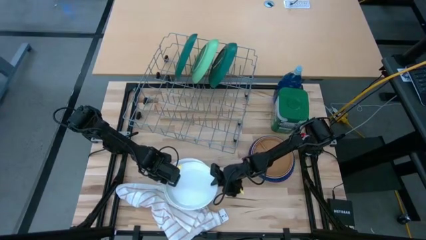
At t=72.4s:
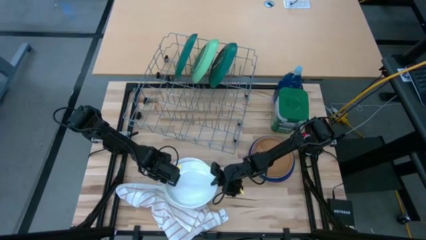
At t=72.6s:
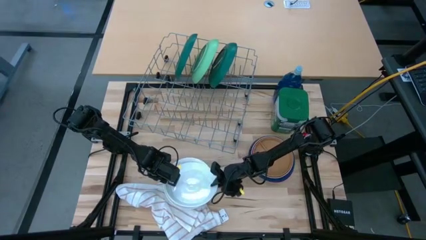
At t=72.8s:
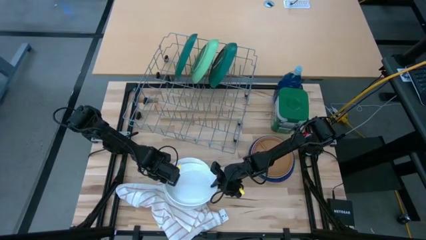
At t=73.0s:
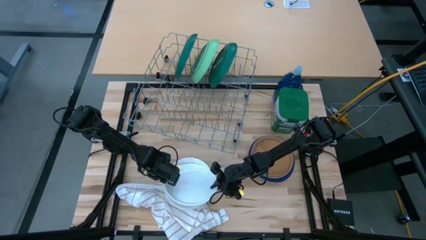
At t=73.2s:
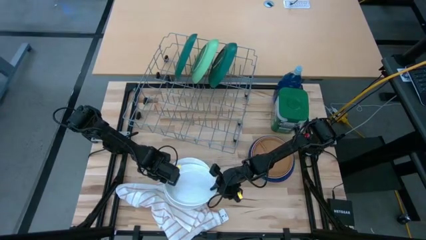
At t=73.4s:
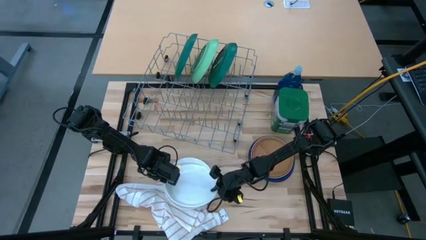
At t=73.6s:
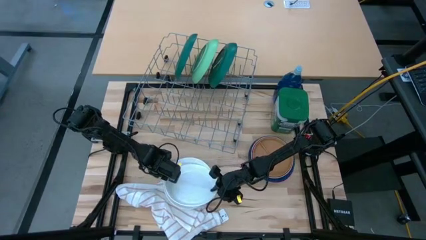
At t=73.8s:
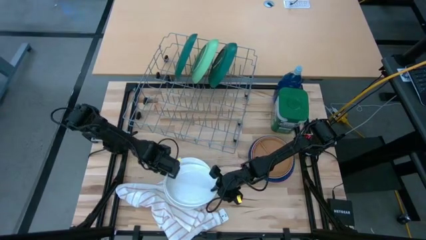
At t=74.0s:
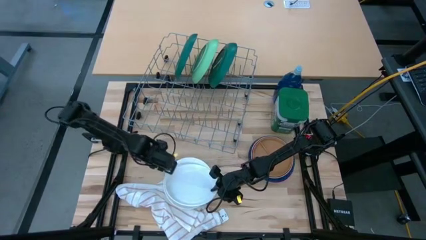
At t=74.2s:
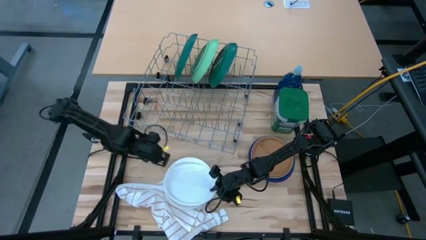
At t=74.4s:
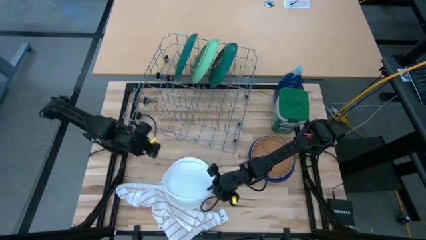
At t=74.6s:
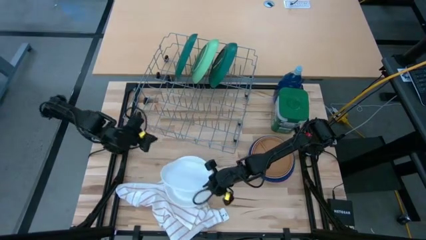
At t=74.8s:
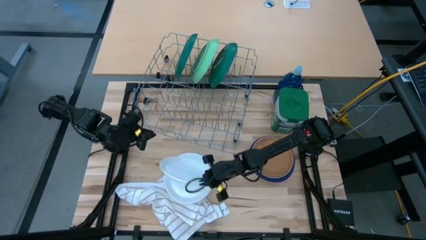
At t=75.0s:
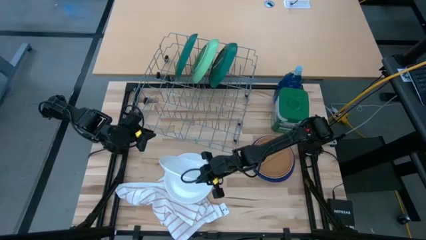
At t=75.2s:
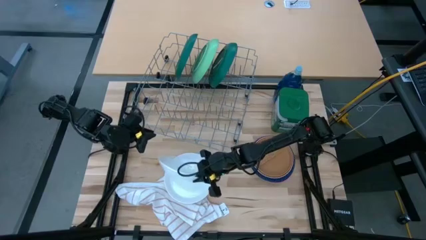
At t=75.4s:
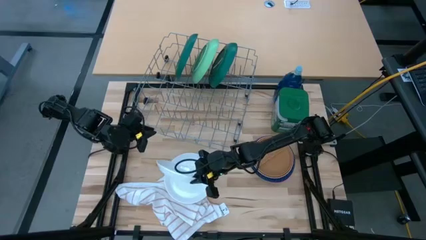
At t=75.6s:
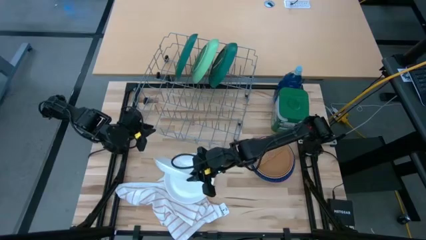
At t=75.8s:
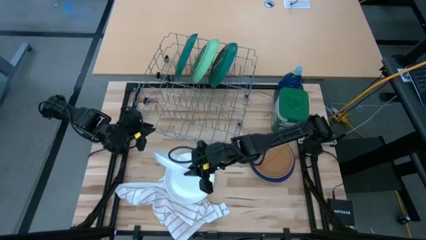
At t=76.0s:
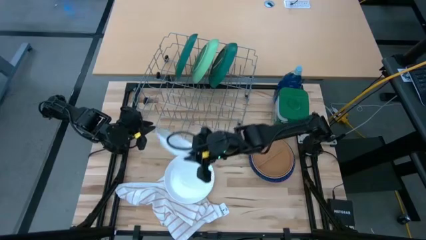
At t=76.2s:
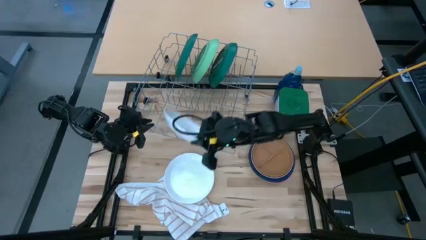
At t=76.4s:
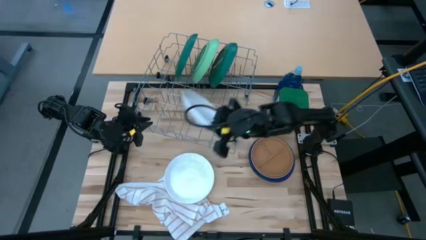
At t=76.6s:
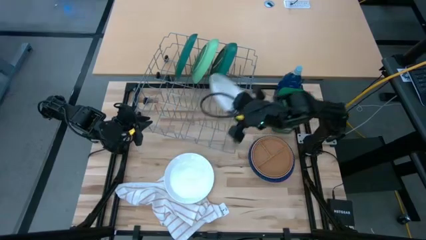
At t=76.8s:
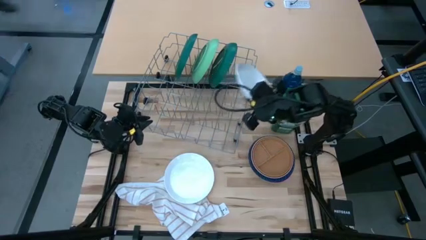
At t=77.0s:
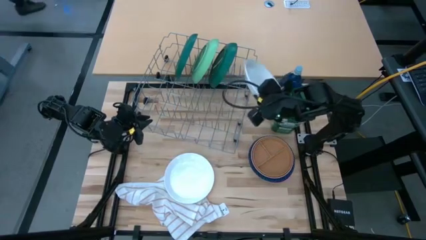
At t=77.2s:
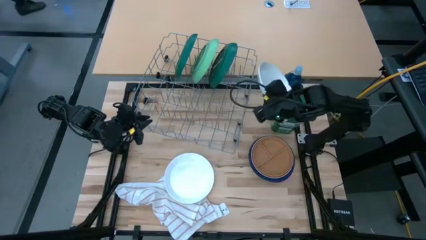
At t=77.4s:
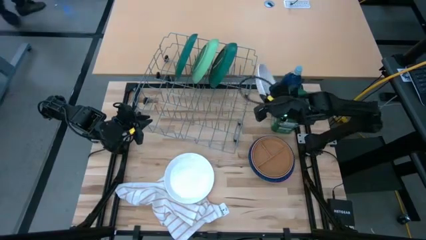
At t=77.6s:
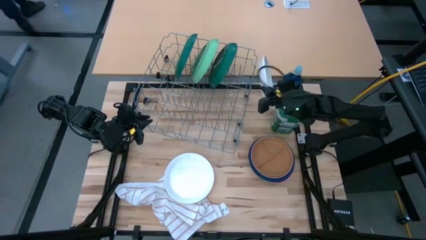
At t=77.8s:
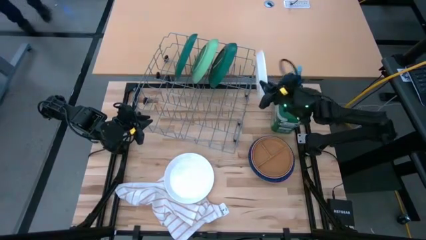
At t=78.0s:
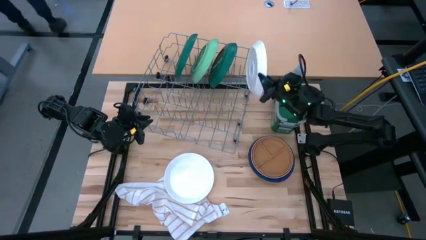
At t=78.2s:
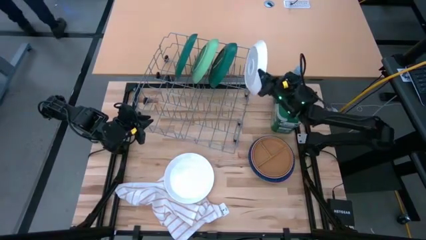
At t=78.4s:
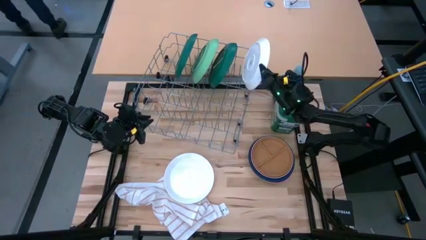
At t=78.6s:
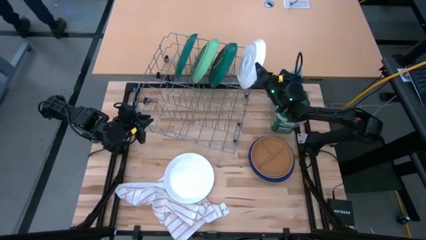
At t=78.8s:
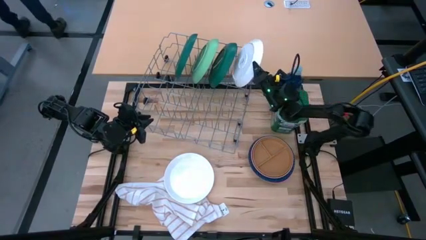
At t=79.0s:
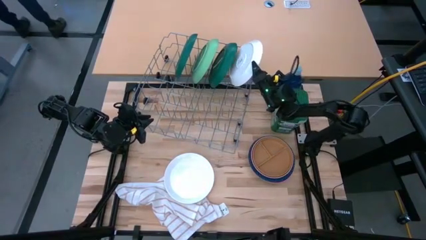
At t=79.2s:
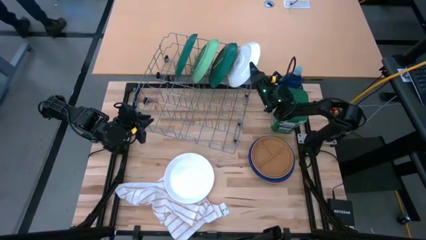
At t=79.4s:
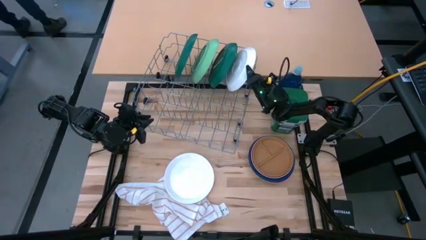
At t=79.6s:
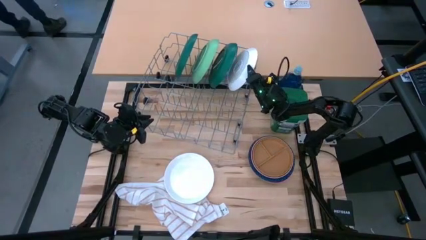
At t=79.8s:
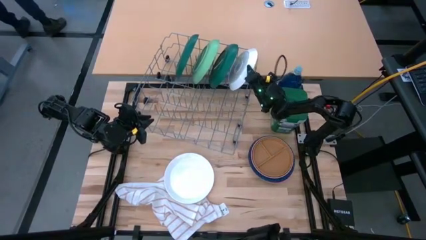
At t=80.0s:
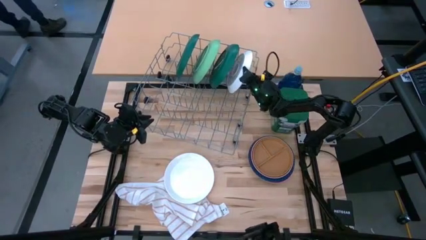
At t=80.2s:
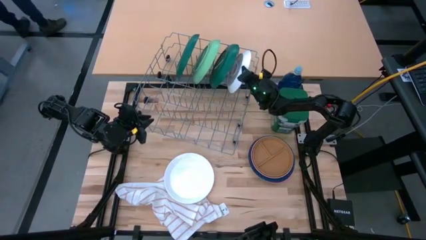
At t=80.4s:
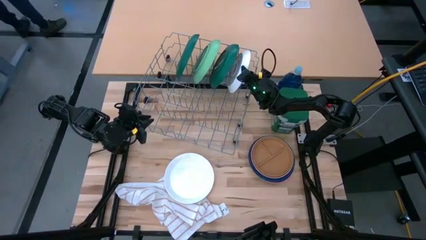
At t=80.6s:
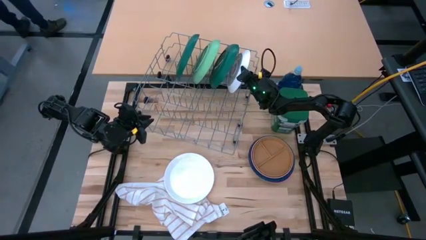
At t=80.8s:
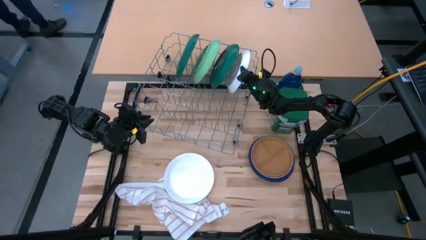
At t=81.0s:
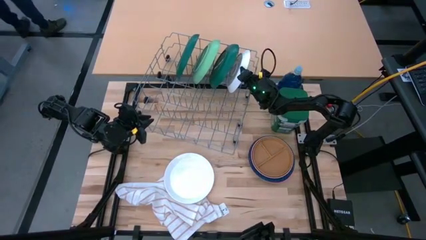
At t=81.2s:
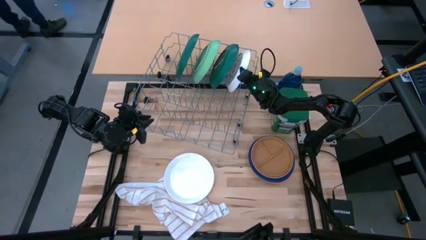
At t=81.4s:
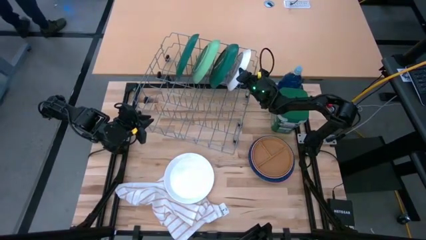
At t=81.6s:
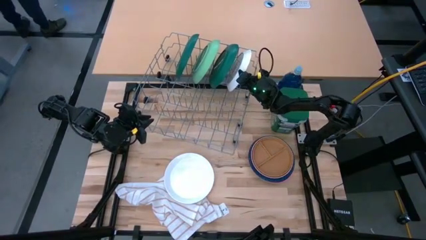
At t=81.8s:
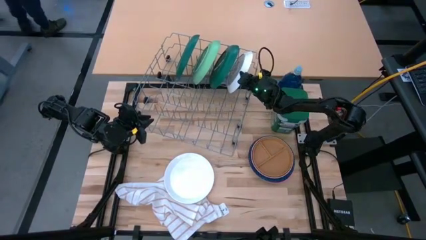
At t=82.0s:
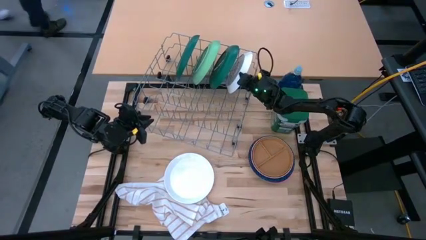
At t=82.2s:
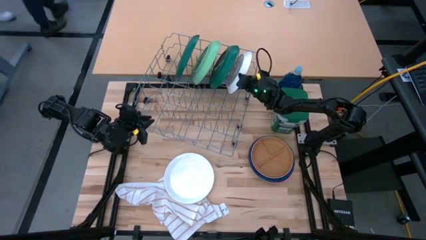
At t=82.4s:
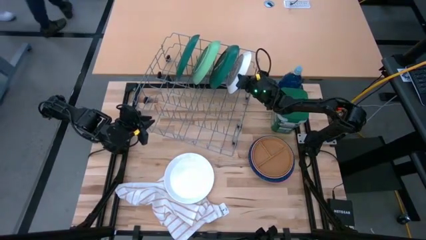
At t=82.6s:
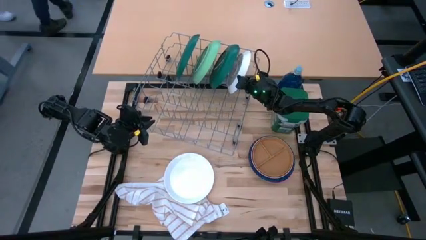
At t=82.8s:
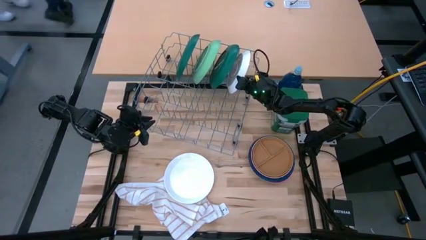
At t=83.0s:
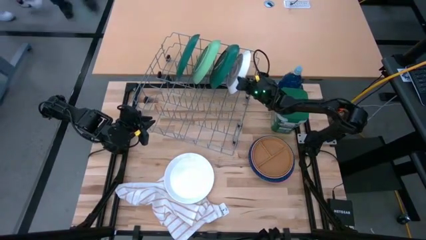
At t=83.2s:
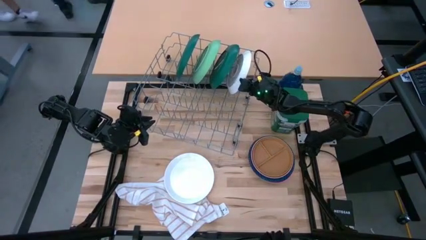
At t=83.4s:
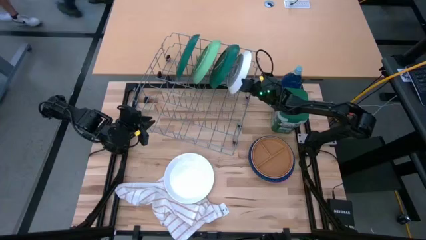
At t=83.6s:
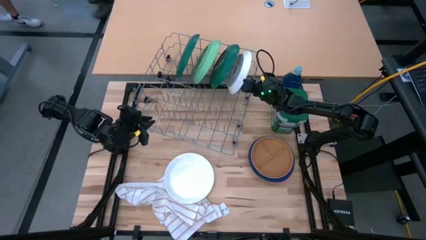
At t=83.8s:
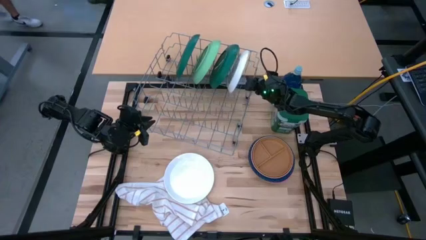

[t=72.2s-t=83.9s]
Task: Sort dishes
Put the white plate in the dish rack

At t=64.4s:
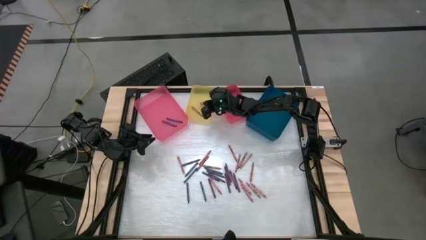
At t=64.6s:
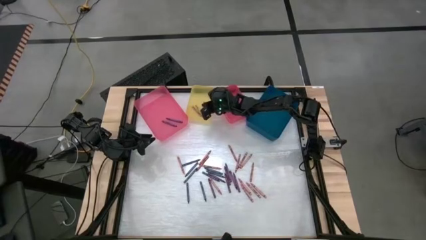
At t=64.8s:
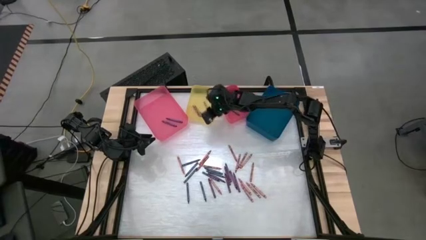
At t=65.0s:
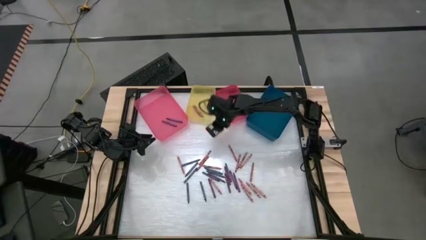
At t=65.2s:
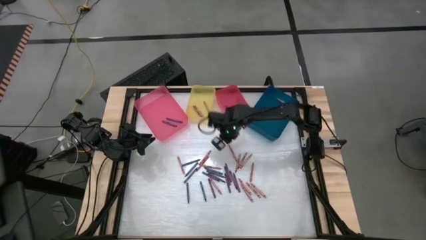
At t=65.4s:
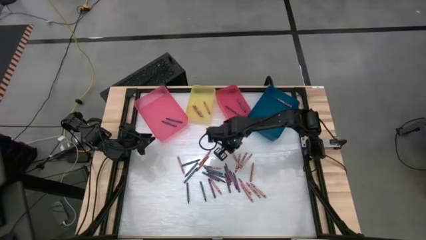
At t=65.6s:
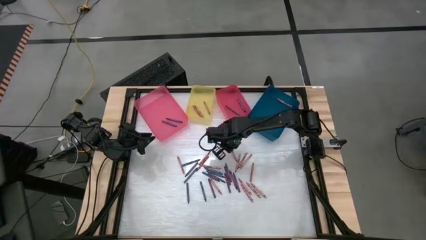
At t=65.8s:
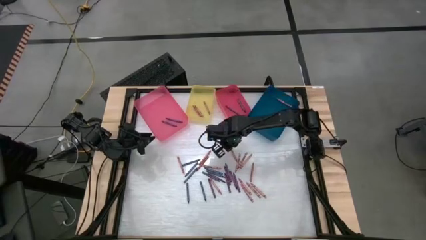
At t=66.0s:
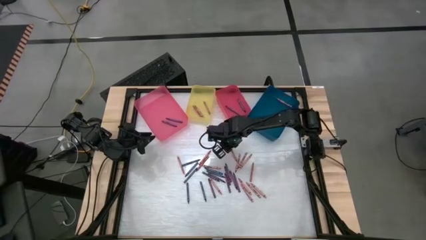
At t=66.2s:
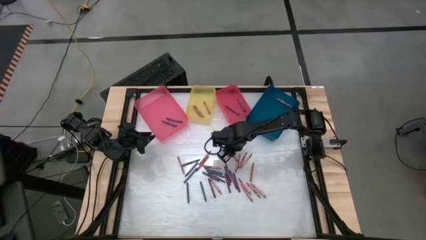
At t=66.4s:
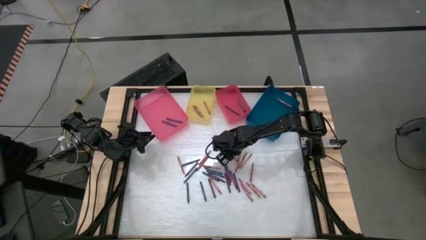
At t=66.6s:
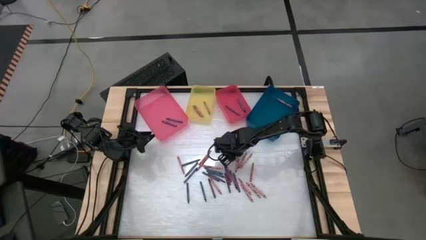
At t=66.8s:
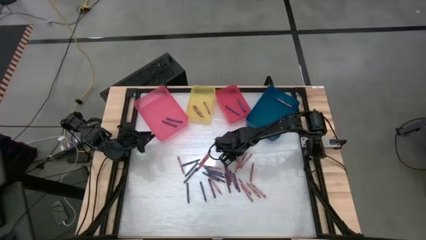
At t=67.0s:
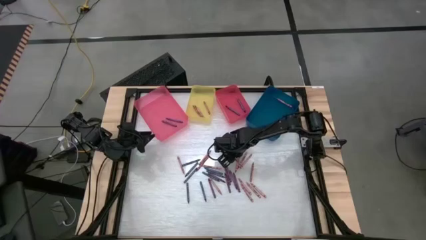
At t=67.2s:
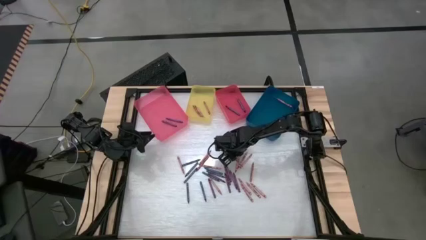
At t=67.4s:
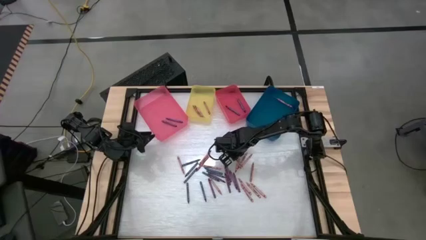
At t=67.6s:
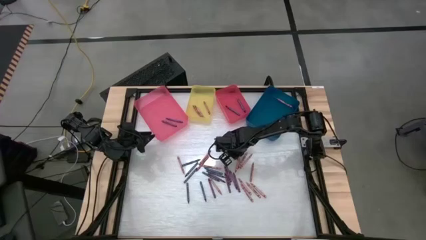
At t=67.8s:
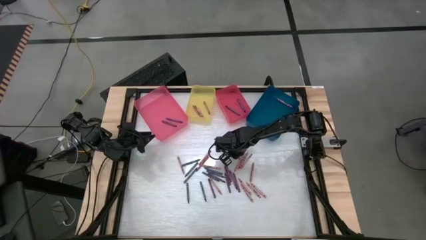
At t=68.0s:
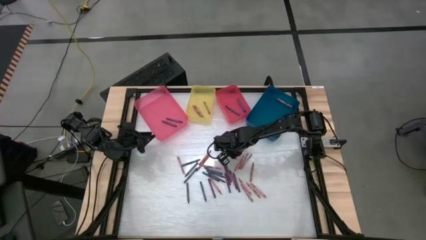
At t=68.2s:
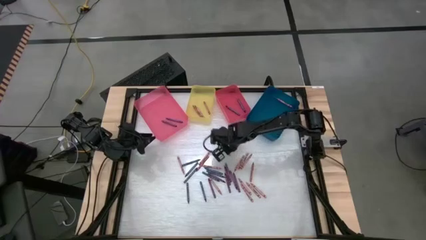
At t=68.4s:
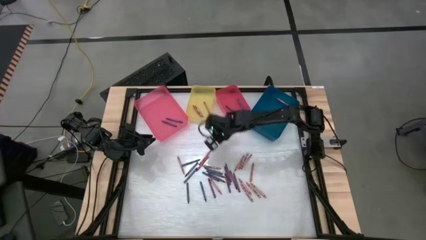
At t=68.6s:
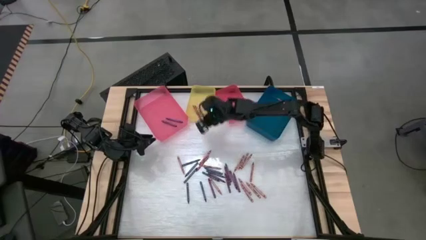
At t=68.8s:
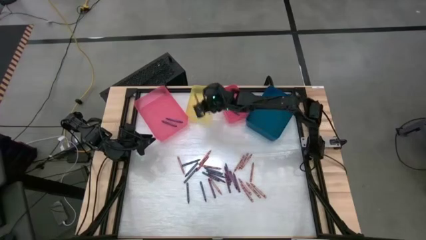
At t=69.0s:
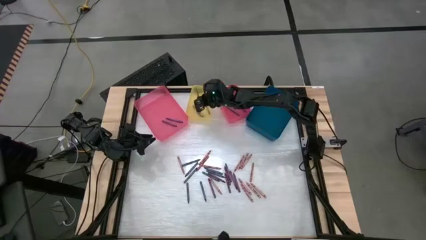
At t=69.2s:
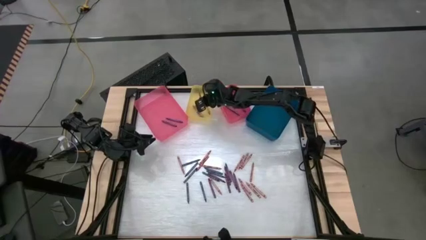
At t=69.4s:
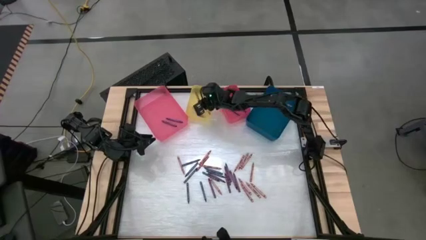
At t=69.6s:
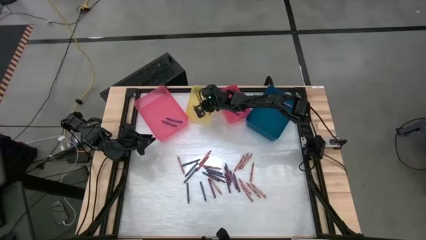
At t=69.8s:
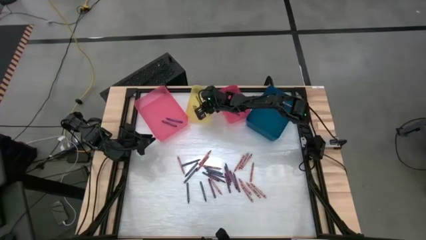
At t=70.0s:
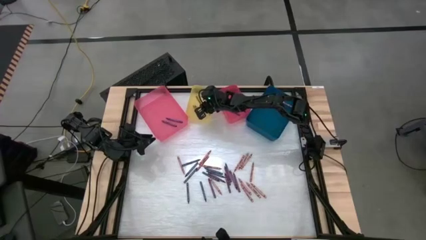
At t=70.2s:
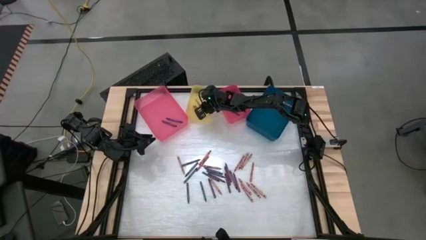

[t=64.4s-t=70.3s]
Task: Sort crayons
Put the red crayon into the yellow bin
